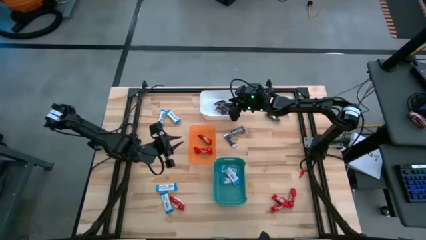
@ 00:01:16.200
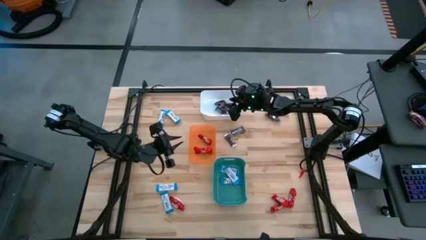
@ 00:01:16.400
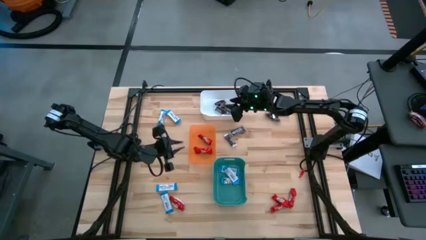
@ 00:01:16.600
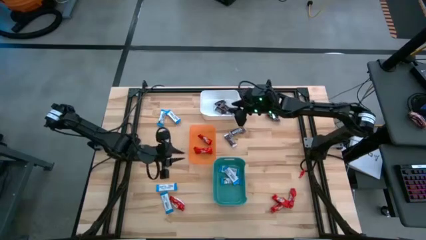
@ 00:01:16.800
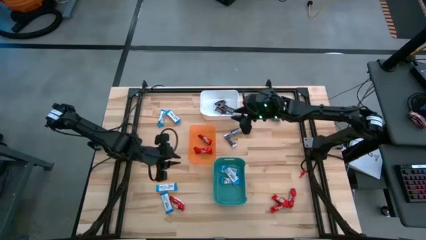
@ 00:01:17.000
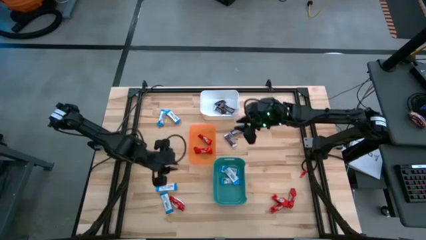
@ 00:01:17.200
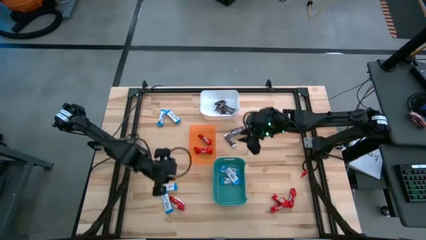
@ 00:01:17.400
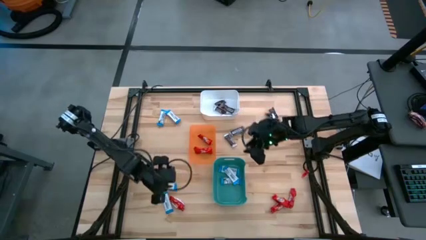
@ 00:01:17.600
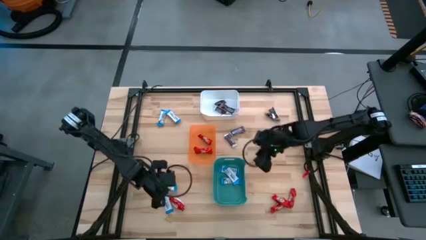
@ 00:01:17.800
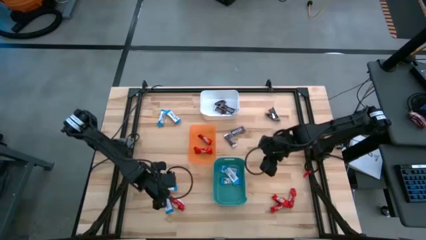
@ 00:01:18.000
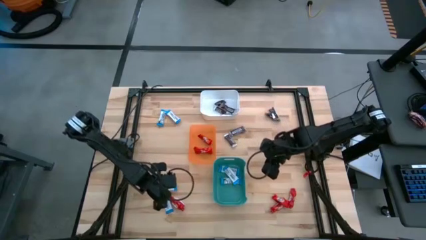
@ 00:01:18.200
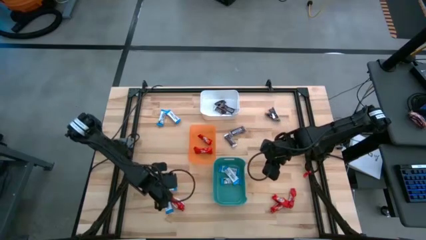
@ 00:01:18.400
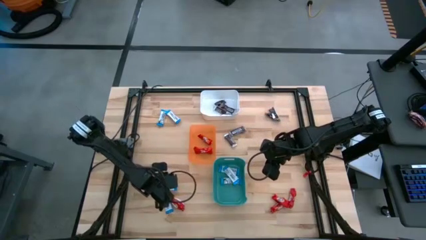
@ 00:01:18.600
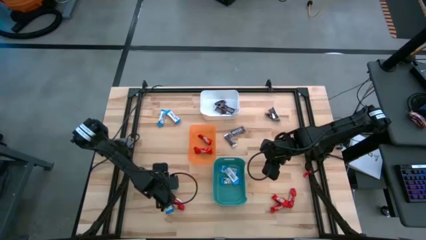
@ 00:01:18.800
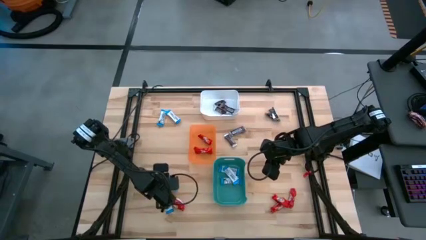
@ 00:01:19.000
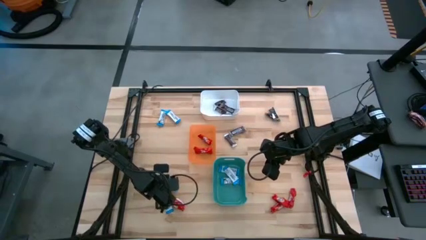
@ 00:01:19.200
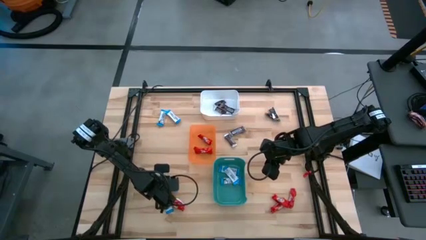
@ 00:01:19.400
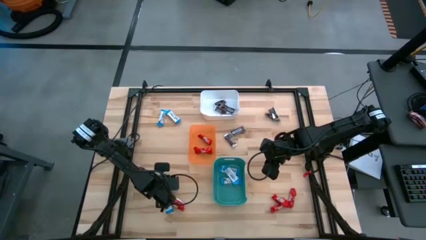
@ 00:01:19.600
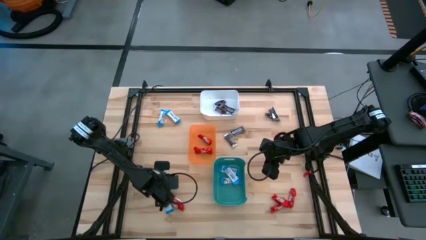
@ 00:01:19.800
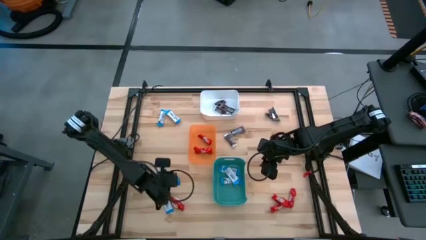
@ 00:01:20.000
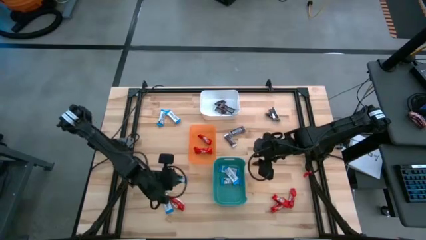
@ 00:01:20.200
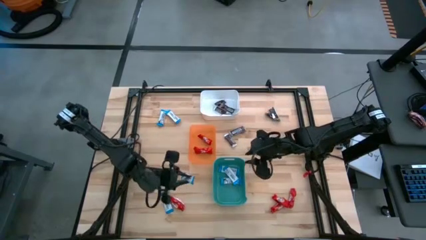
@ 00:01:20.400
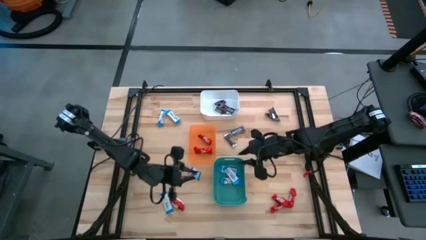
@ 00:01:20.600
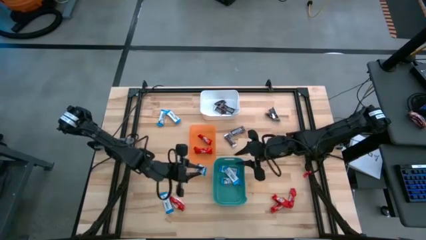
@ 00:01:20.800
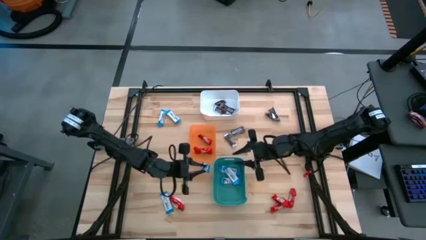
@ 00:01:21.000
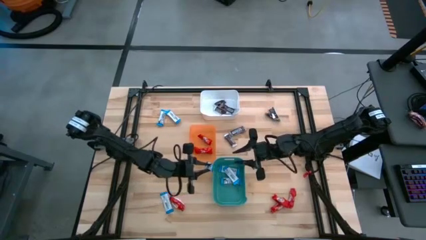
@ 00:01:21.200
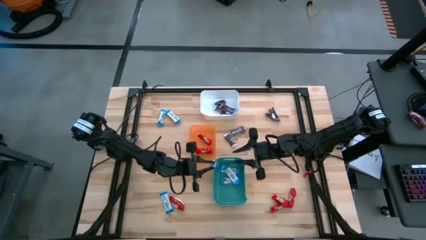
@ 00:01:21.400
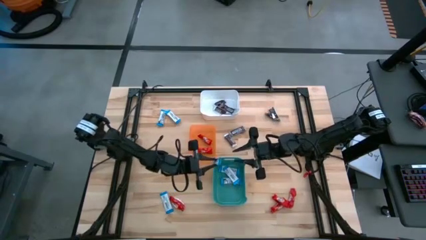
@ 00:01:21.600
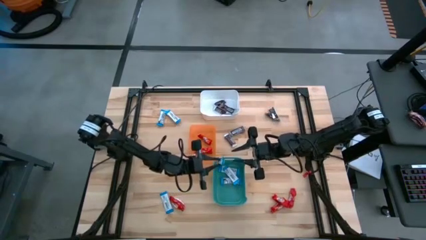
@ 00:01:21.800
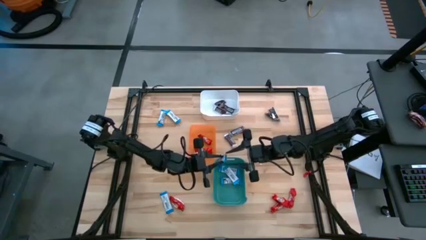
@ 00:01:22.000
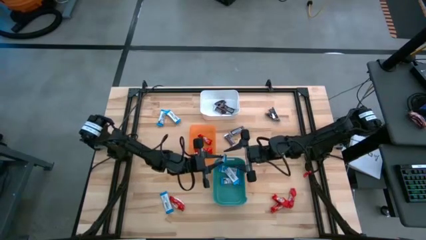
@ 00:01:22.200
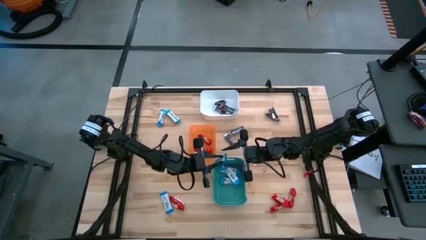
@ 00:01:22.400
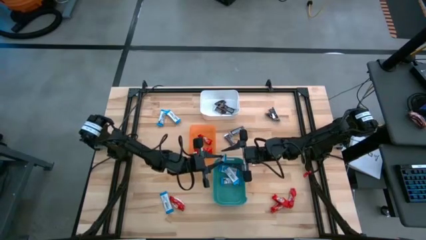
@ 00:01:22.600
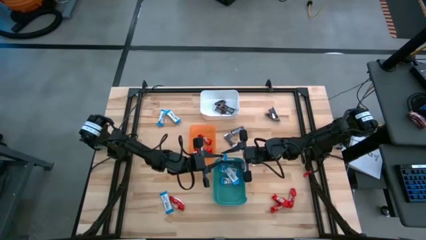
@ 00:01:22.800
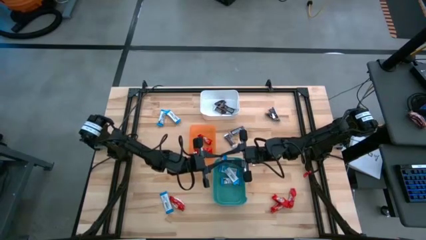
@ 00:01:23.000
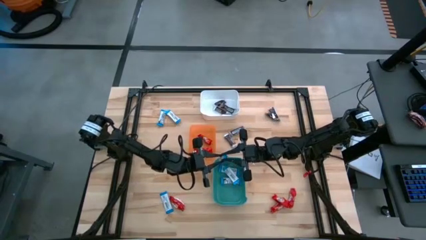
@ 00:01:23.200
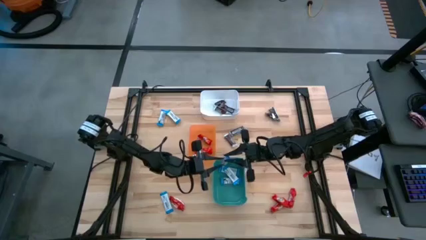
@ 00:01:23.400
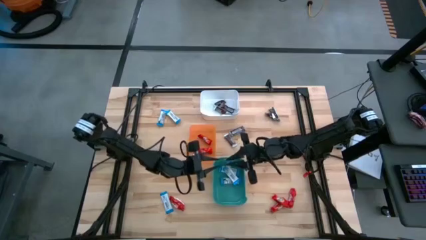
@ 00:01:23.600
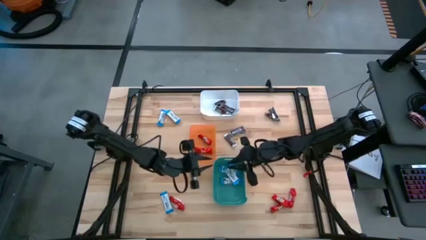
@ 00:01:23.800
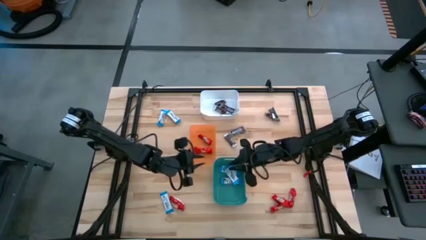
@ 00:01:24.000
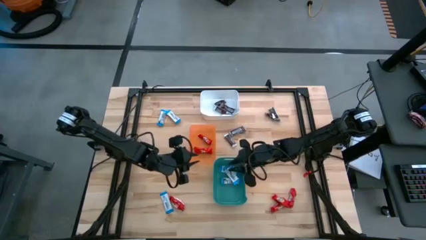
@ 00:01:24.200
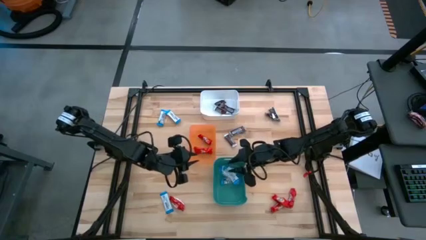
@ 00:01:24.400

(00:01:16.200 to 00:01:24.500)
Task: Sort candy
Put the white chocolate bar into the green bin

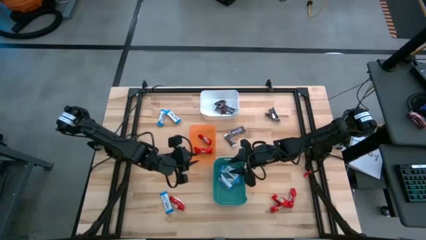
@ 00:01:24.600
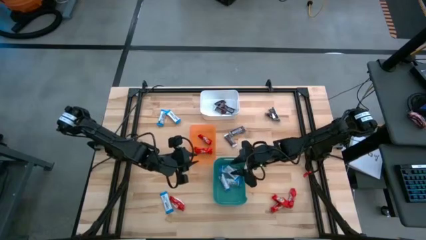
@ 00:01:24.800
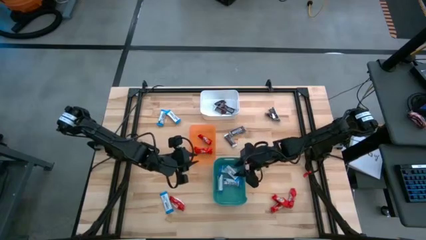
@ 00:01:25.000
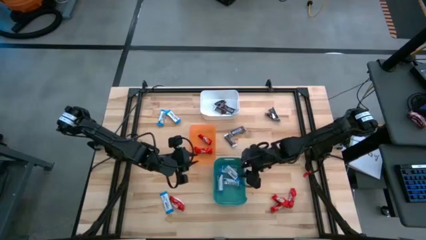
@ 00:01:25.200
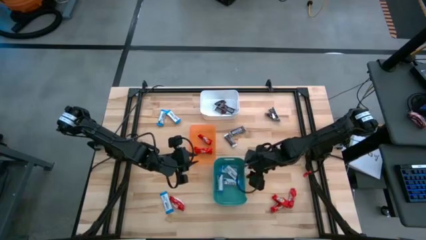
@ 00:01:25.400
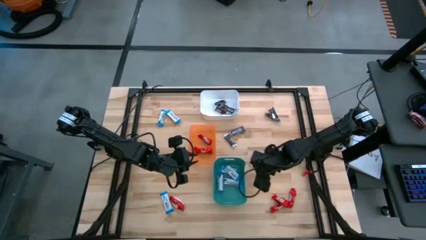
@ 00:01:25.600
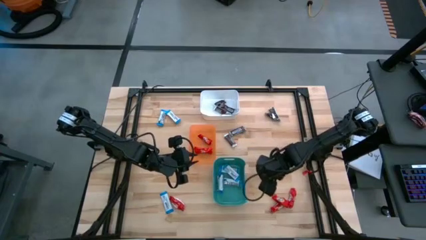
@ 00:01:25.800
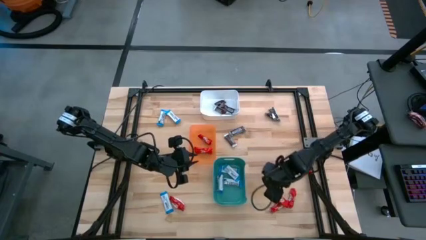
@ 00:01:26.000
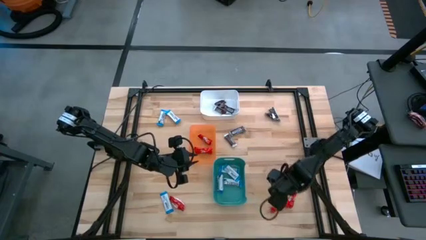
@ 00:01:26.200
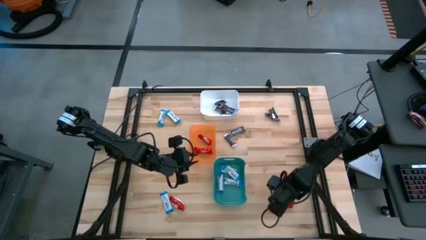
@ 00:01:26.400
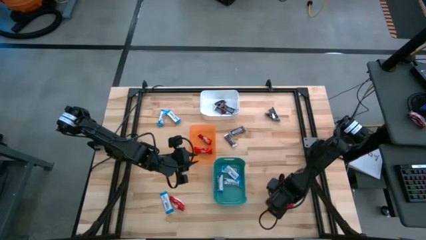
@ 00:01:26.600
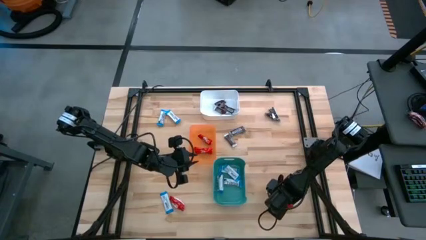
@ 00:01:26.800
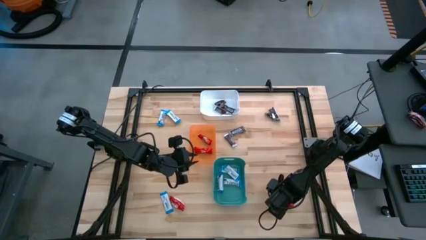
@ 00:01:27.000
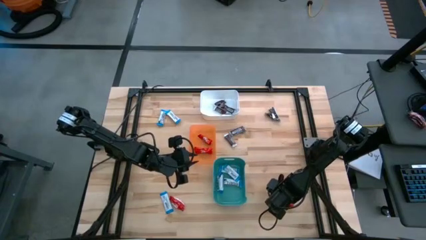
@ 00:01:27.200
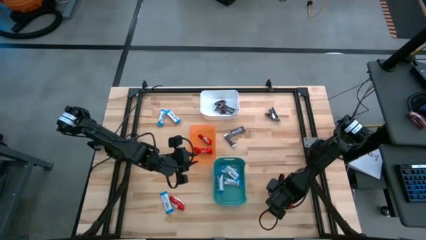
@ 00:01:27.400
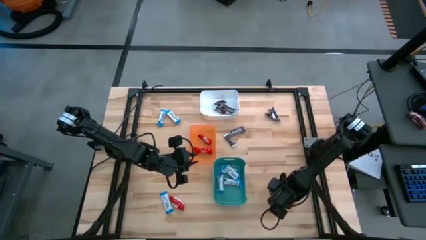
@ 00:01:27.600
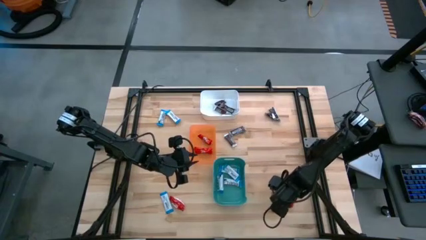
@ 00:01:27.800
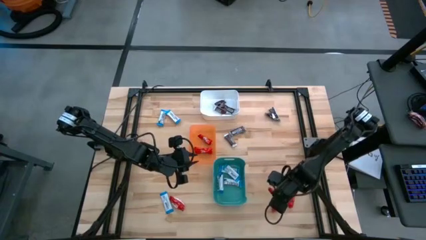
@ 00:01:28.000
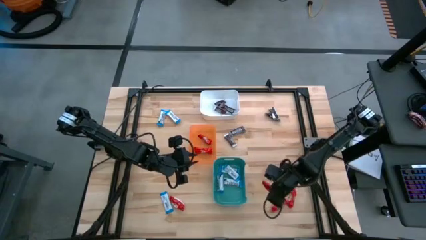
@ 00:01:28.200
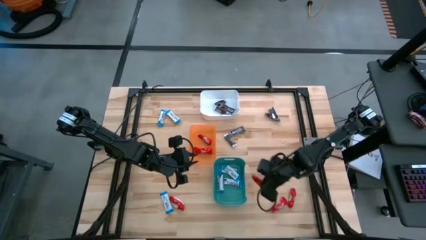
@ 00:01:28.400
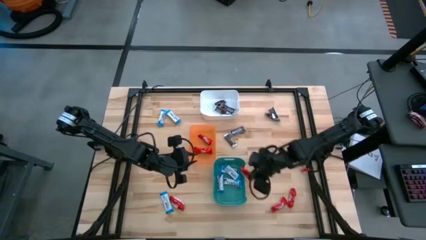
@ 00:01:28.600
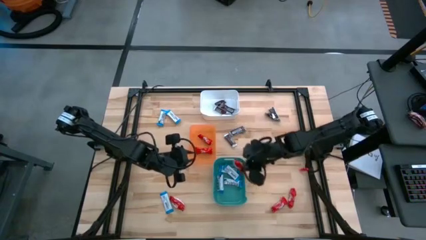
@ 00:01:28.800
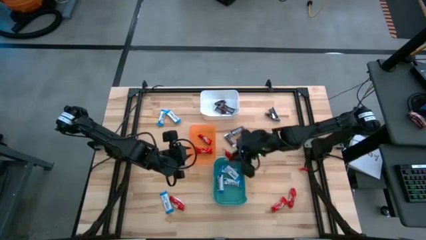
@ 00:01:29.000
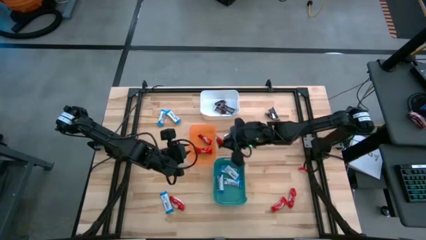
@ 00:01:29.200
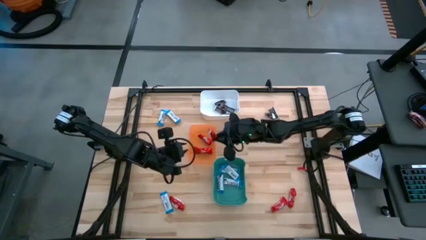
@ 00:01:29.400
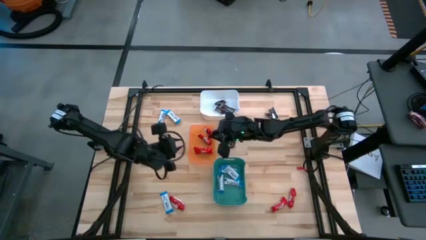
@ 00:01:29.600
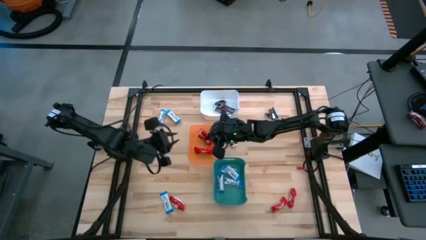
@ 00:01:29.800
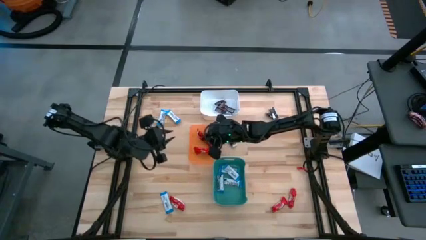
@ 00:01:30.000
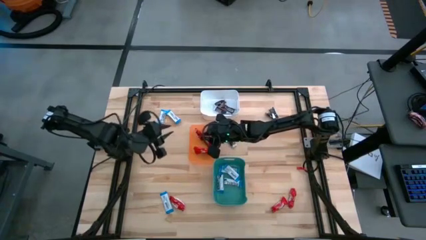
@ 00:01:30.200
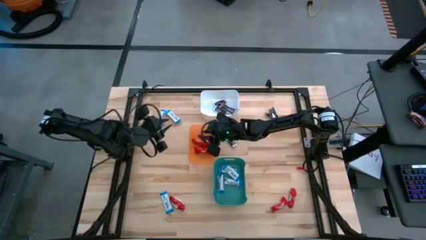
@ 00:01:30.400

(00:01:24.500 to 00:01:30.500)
Put the red chocolate bar into the orange bin

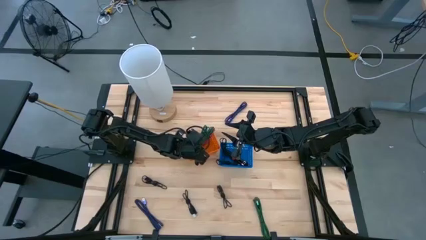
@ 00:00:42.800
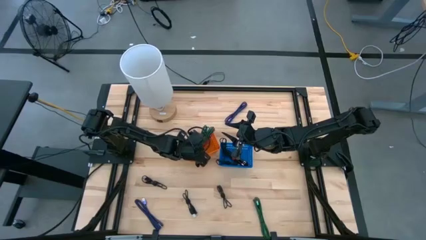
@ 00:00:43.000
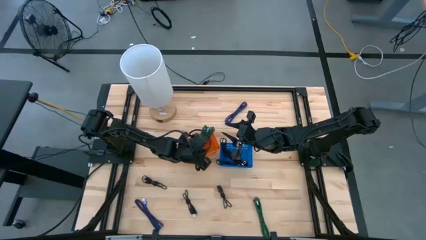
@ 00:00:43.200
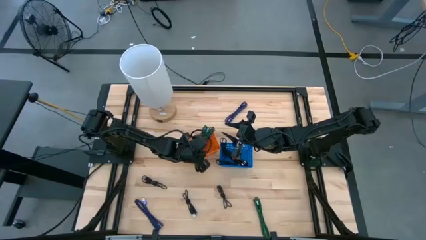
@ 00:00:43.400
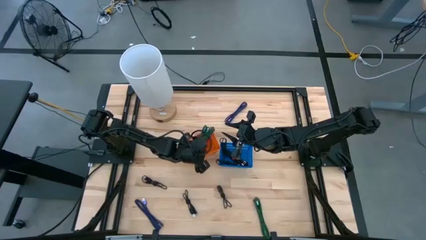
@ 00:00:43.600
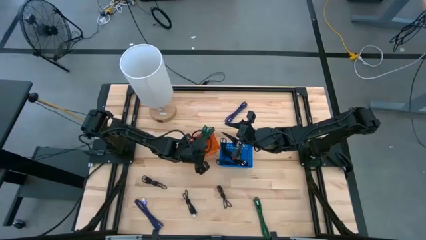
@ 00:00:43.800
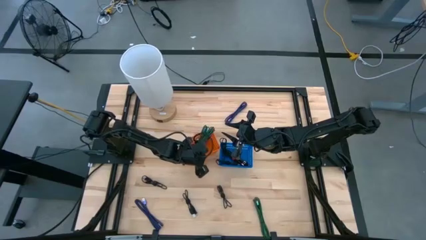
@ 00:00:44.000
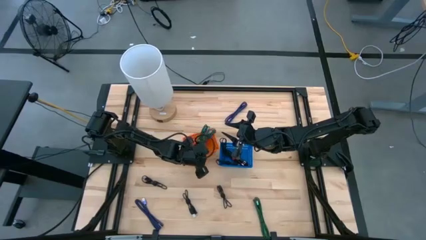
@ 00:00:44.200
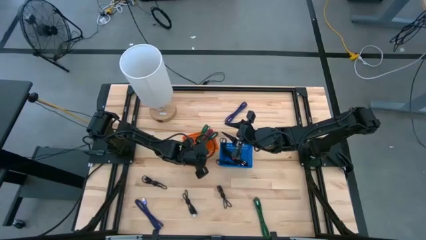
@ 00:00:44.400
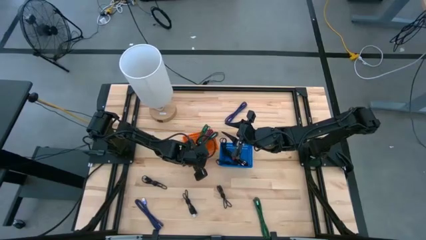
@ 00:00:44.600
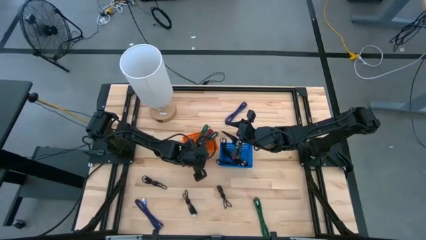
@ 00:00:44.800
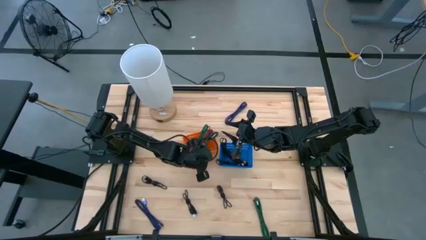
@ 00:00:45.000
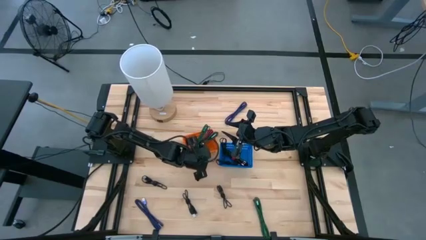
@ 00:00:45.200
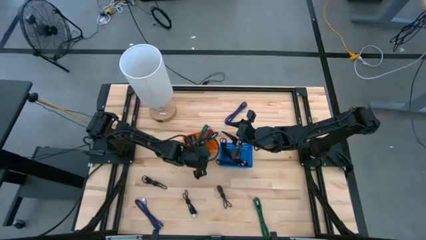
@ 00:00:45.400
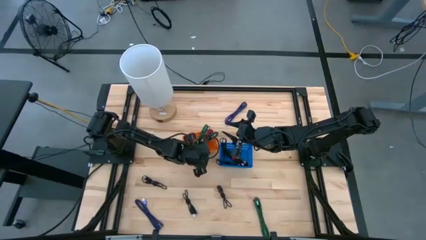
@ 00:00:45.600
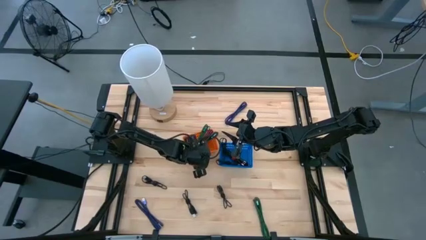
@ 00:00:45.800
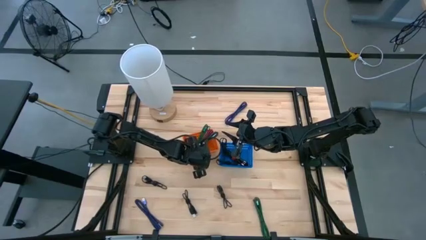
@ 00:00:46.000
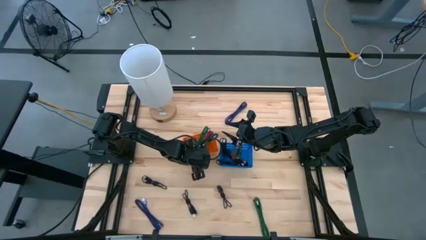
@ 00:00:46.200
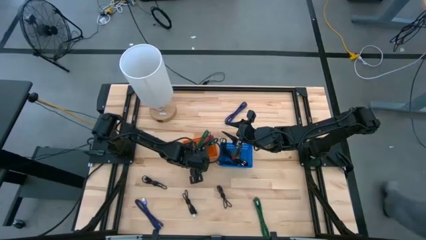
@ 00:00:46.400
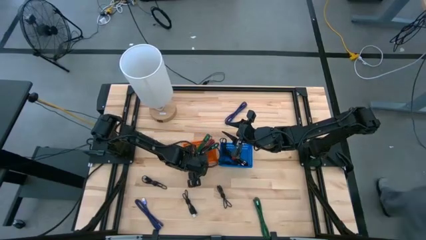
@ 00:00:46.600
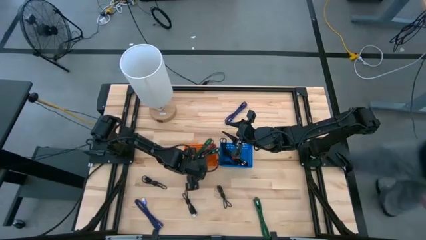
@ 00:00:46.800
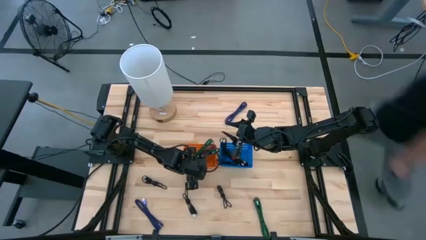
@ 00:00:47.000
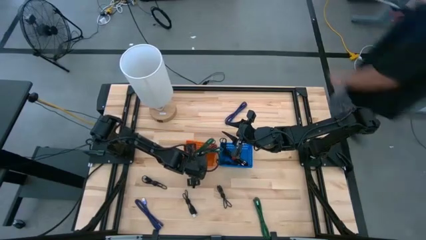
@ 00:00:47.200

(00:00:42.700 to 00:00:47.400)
Task: Pick & Place USB Port
Adjust the orange bin
